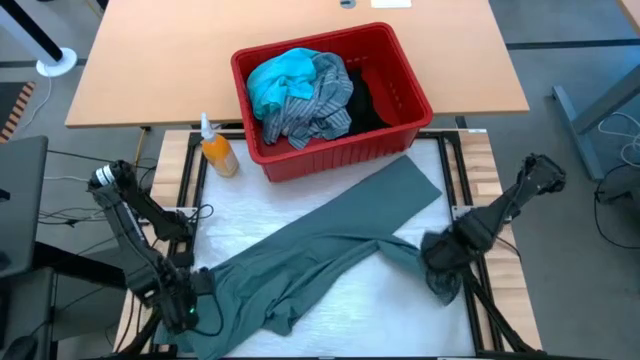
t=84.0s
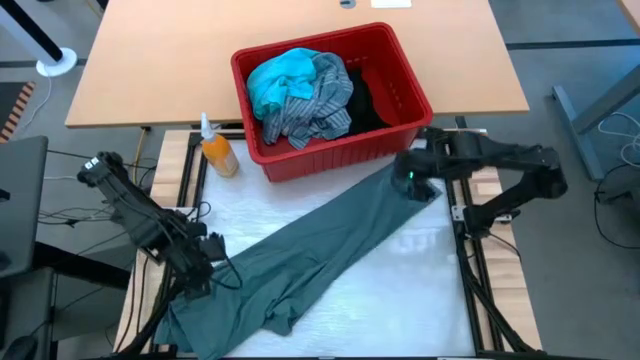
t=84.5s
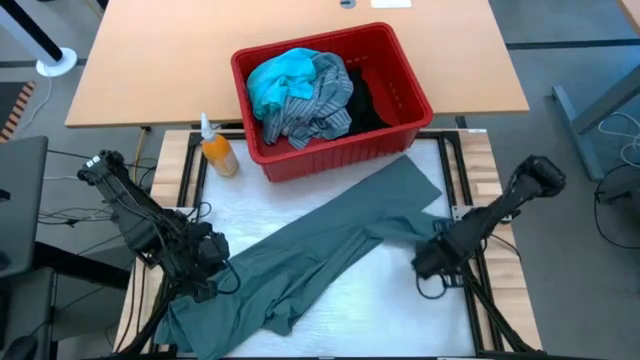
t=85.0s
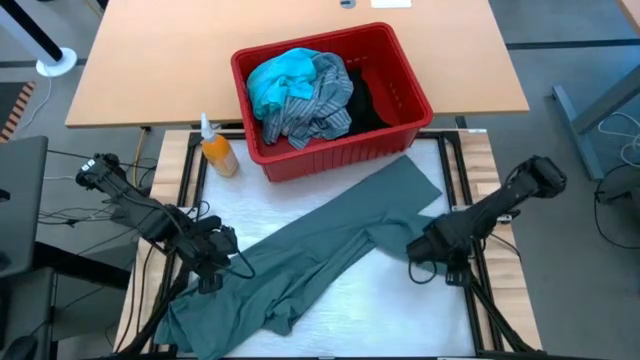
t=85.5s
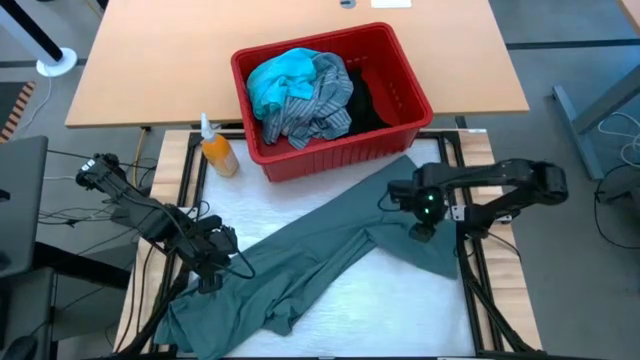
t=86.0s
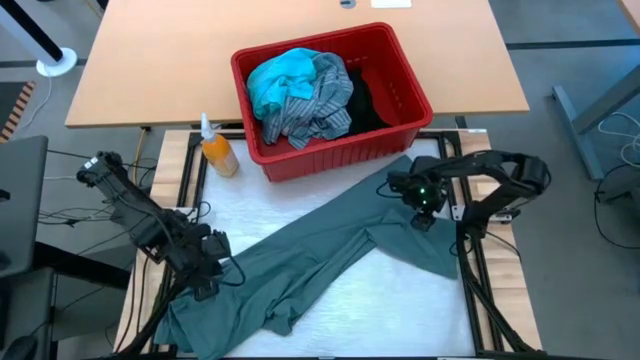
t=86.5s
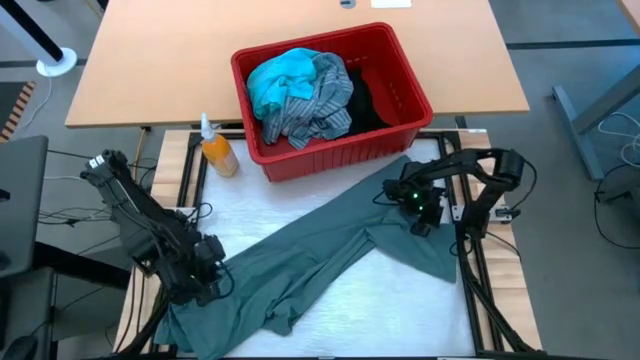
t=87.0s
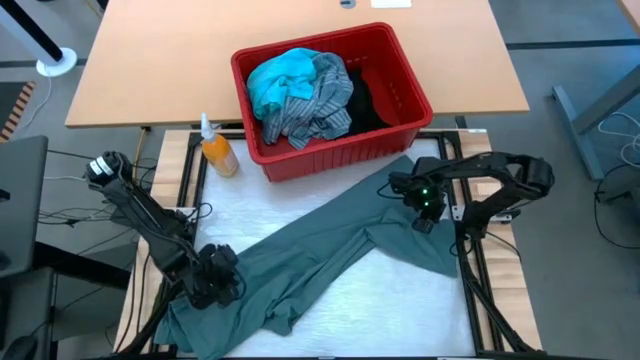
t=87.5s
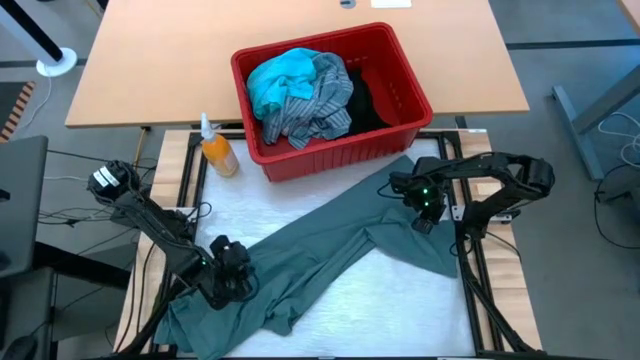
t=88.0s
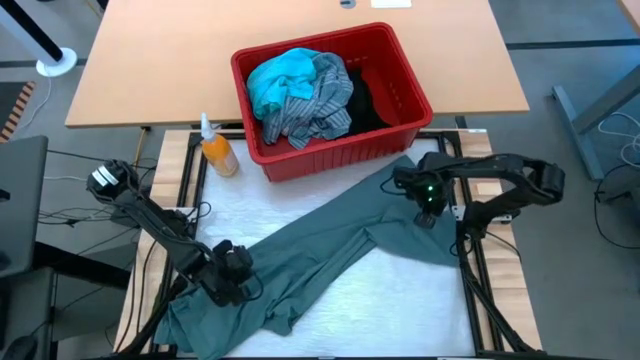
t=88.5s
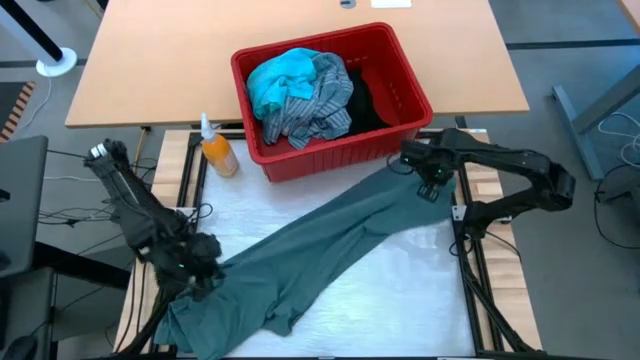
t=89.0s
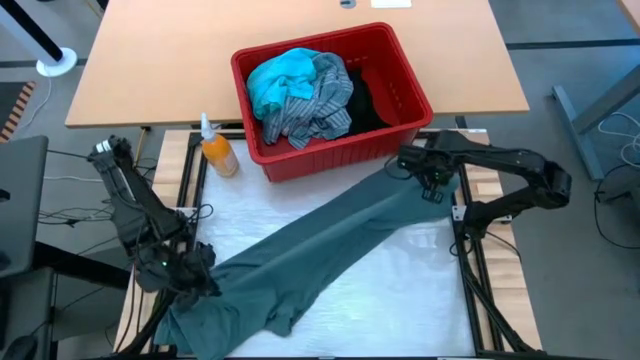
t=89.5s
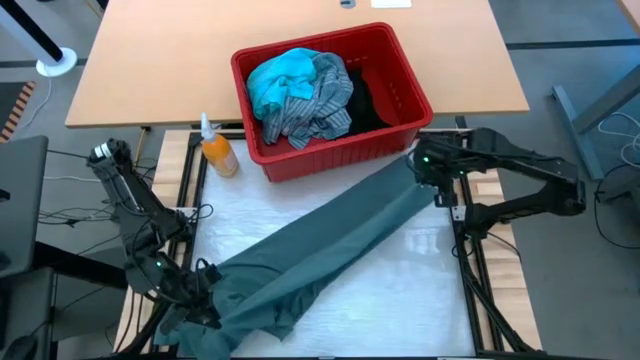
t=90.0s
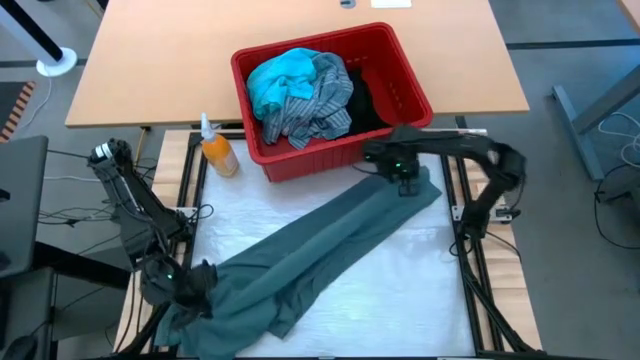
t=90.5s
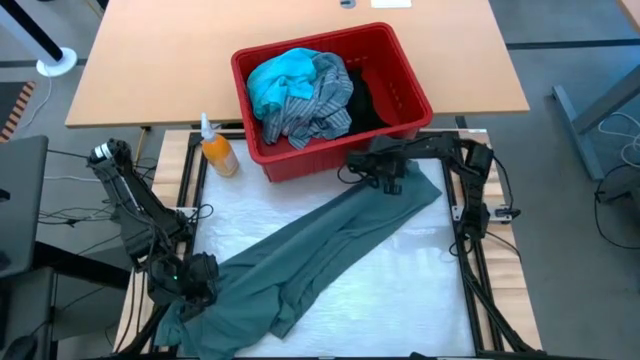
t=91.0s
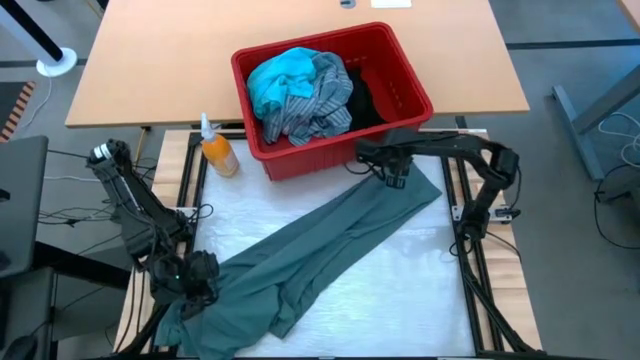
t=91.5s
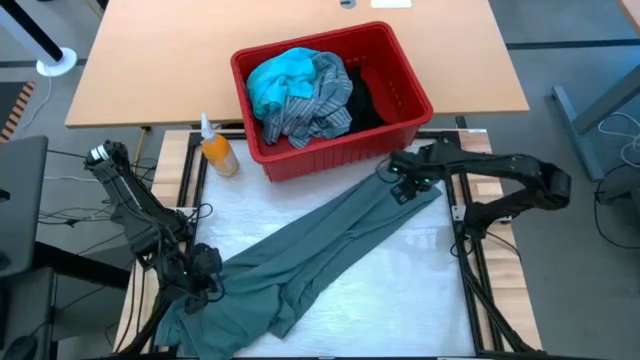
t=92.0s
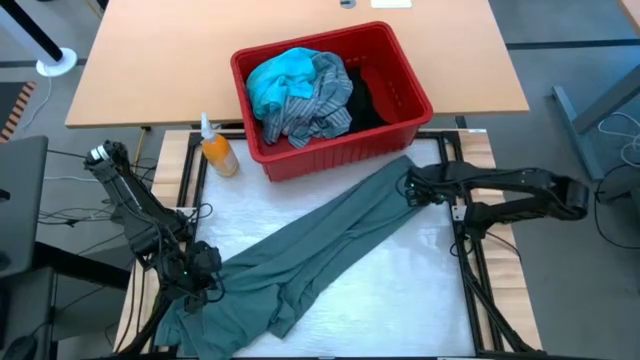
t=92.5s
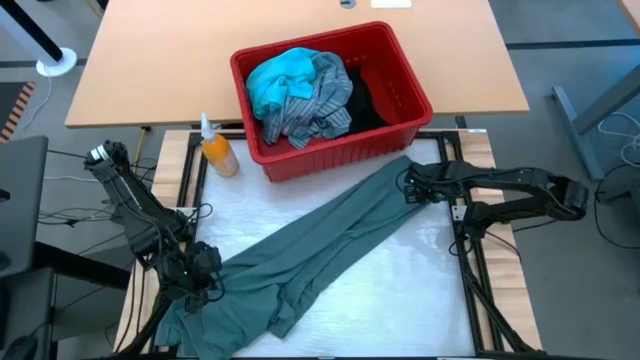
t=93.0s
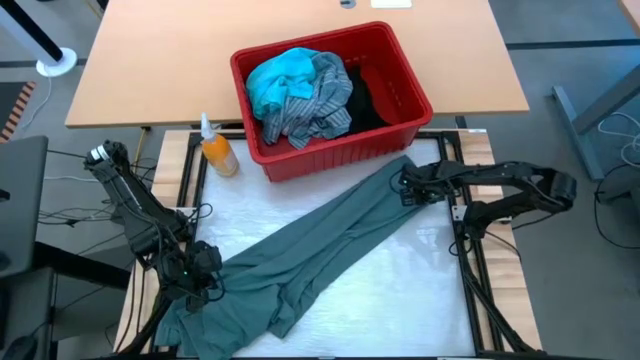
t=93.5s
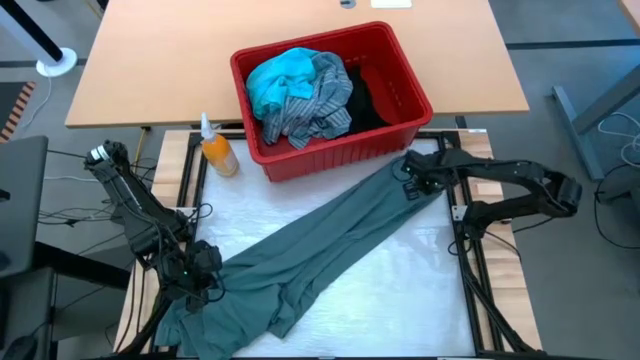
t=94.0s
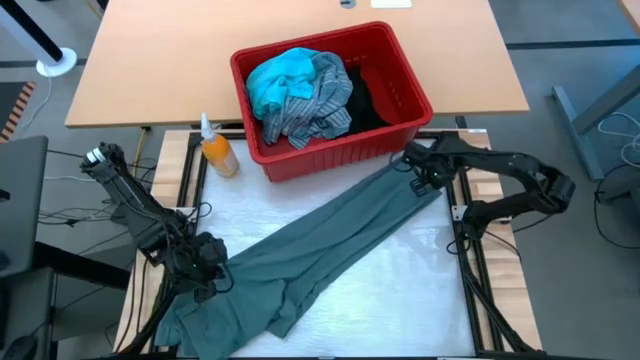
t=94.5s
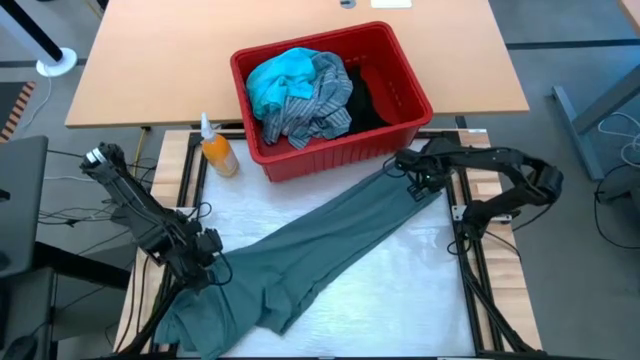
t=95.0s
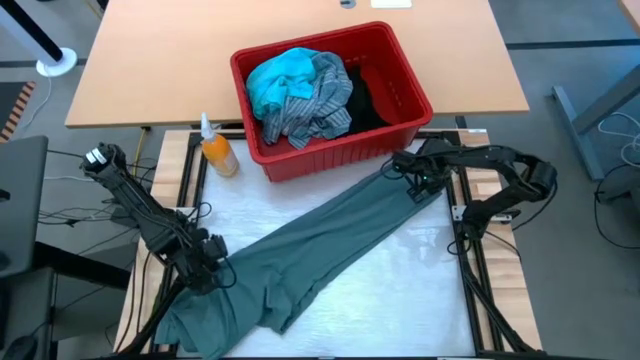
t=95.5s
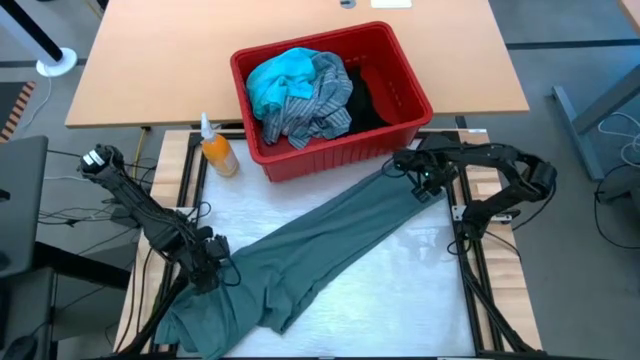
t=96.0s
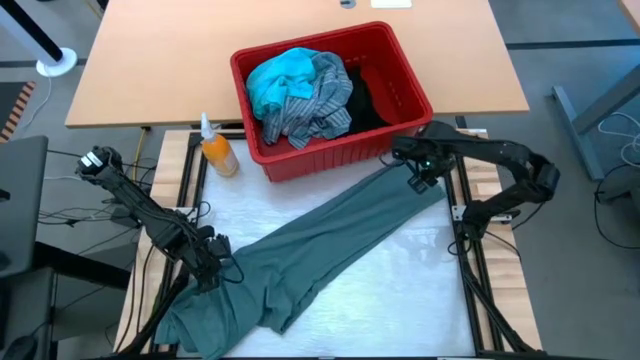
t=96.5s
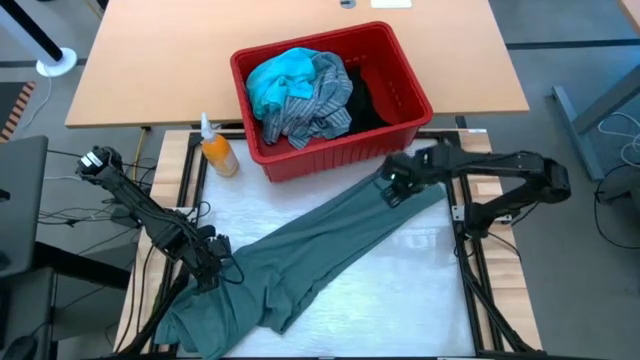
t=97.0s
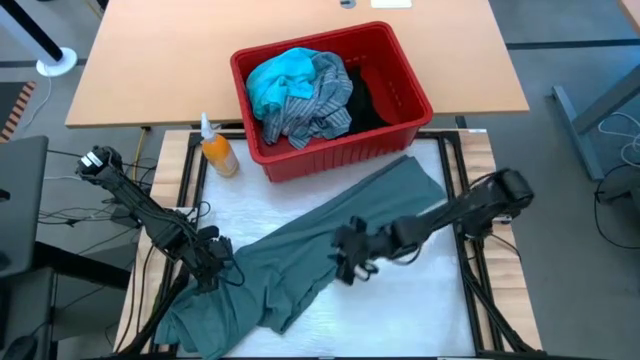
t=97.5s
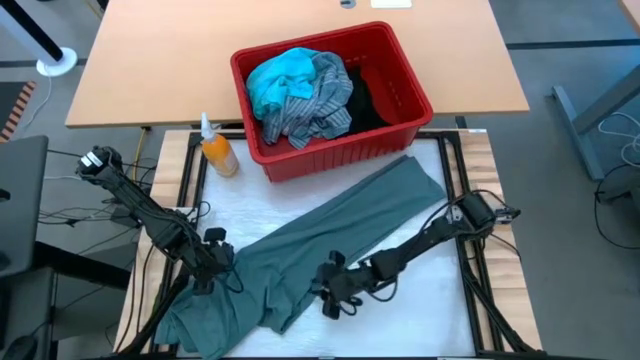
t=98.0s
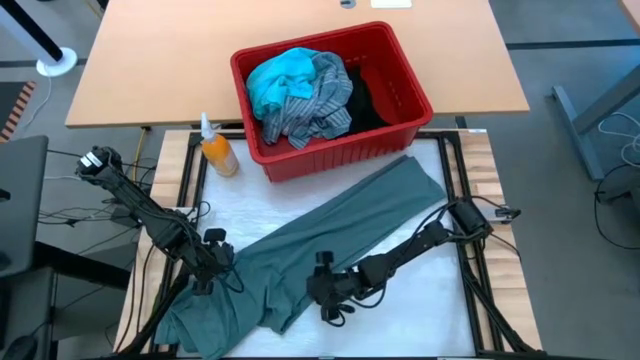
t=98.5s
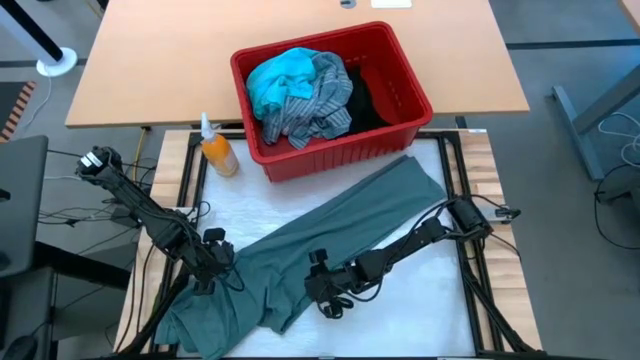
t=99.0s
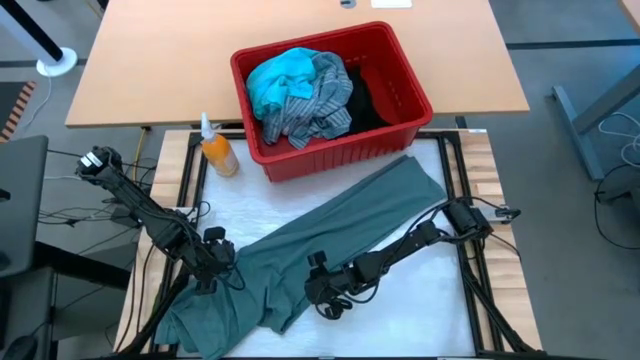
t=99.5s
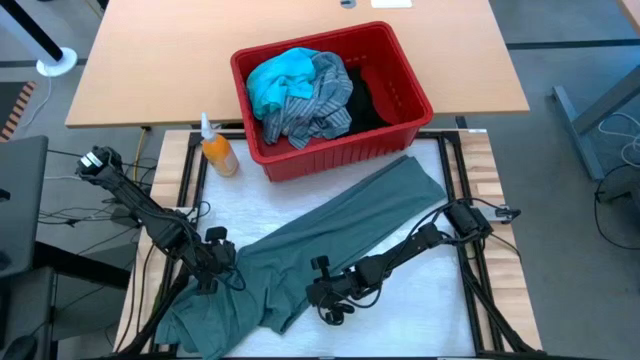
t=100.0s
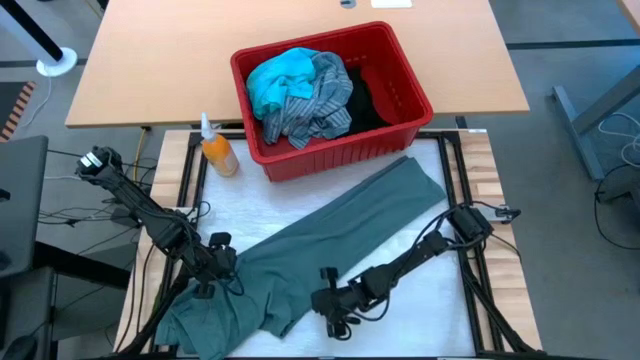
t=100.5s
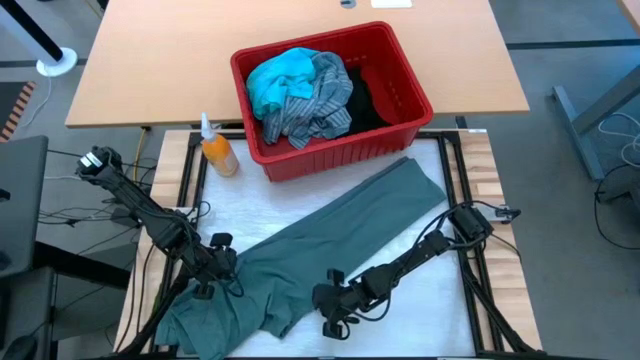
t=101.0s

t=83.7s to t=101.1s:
Task: Fold Laundry from Bin
Fold the dark blue pants

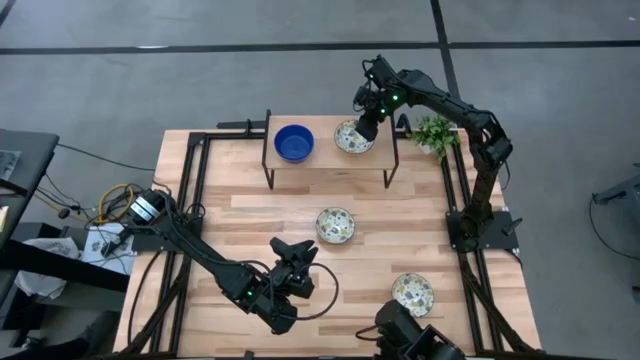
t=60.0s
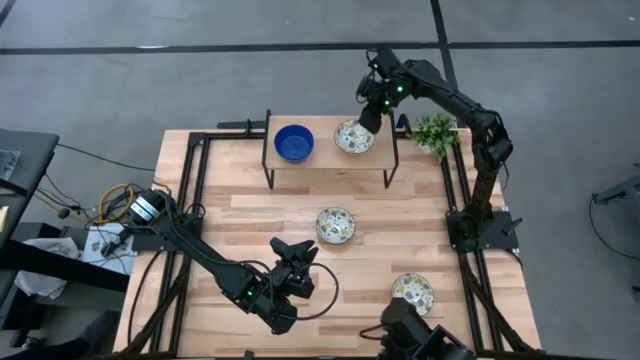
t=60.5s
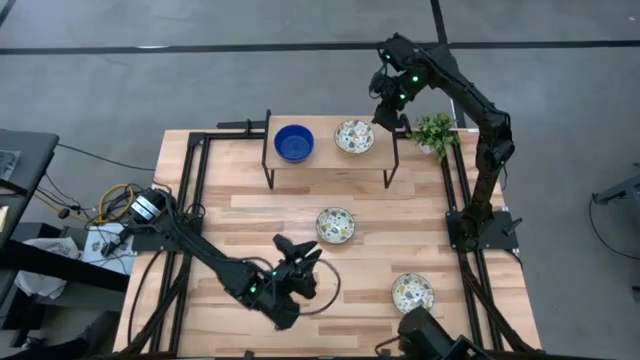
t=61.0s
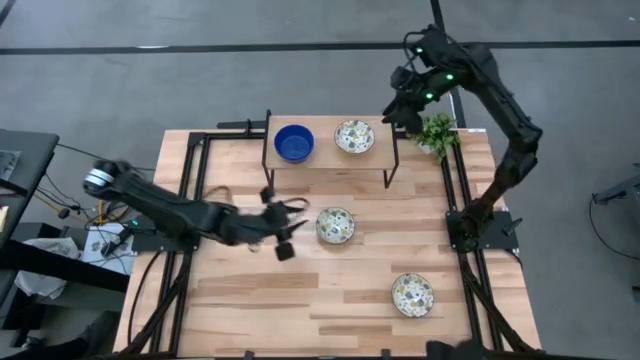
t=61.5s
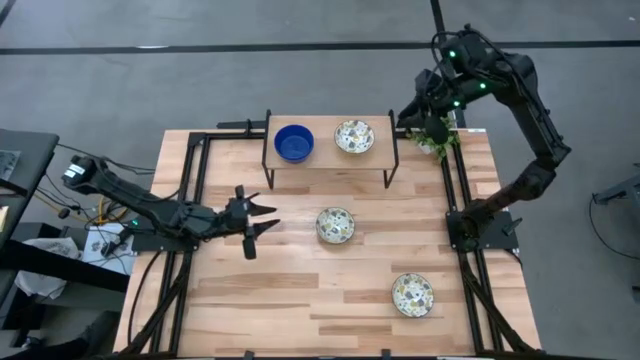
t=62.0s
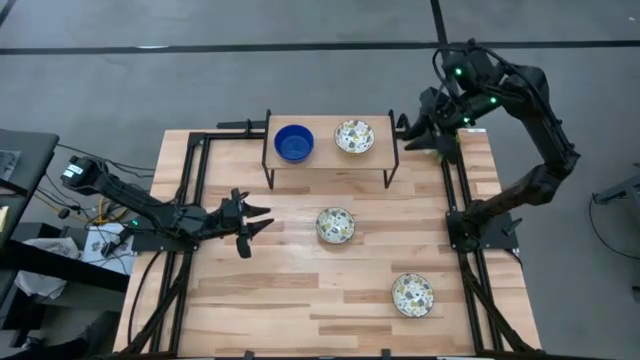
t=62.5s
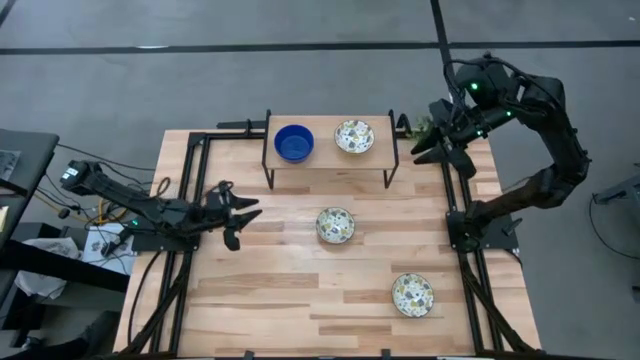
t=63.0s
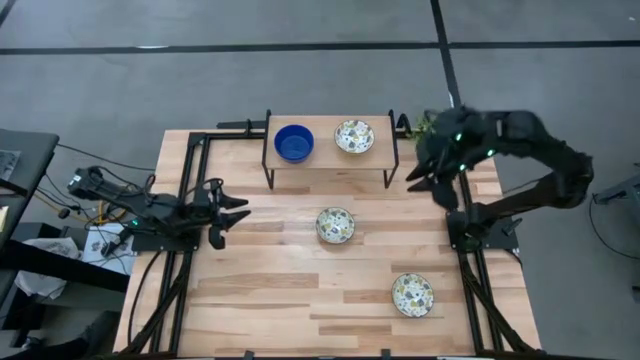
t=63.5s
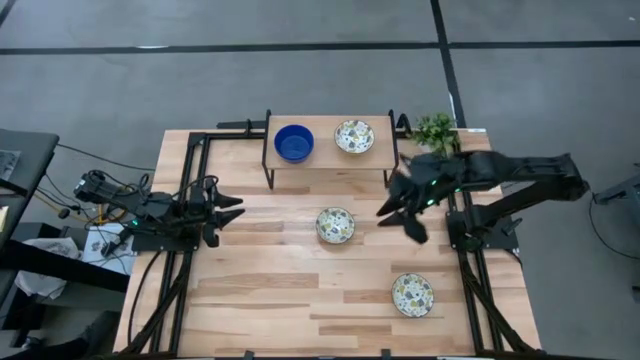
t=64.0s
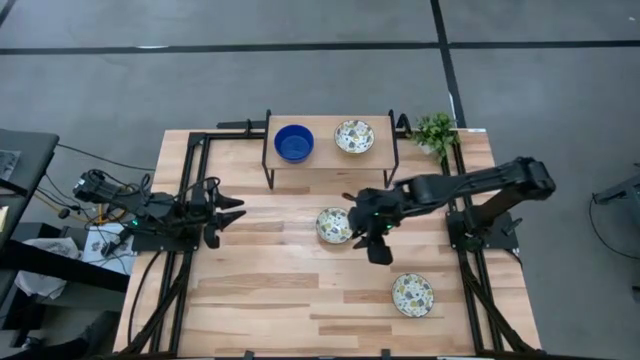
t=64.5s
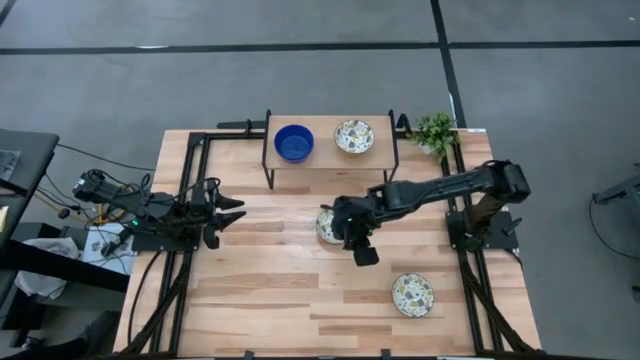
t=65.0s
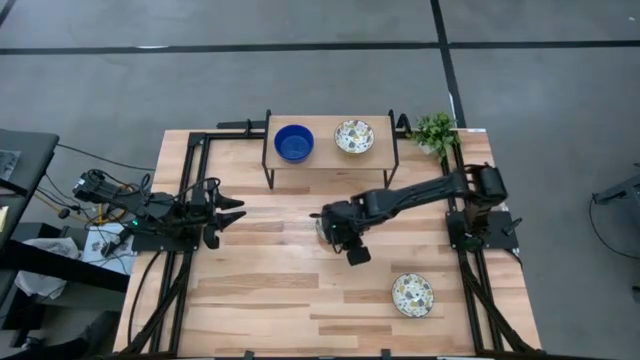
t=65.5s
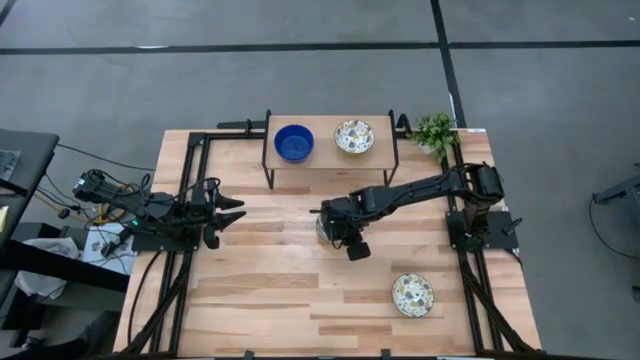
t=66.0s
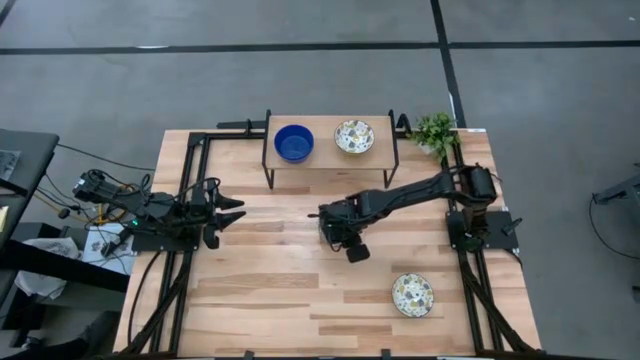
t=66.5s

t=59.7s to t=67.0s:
Task: Pick & Place Mini bowls
Stack the top yellow patterned bowl on the yellow patterned bowl on the shelf
